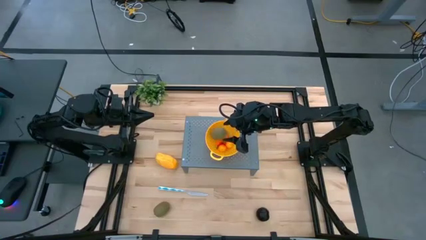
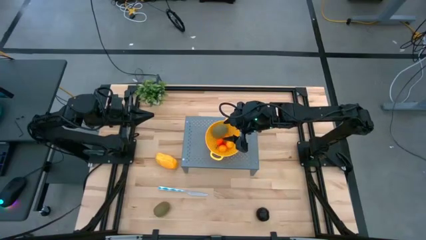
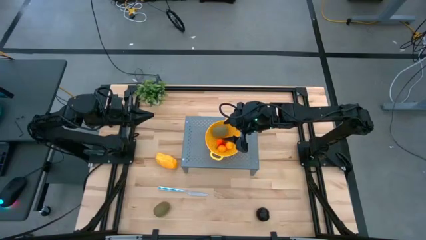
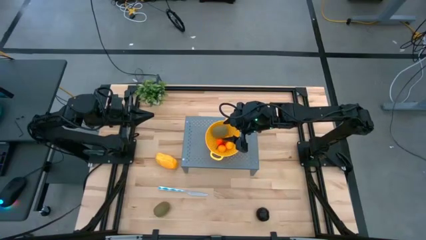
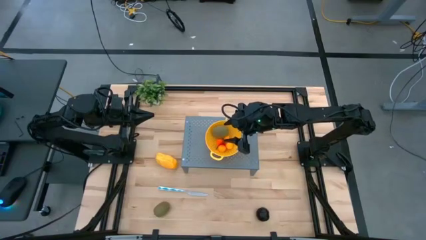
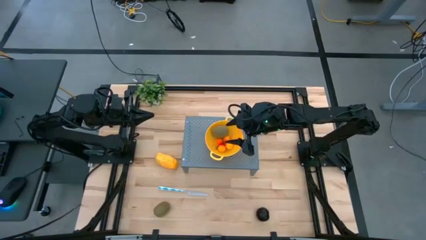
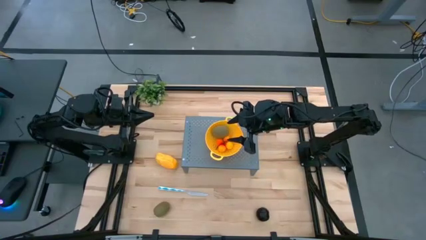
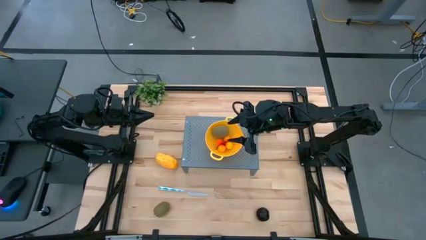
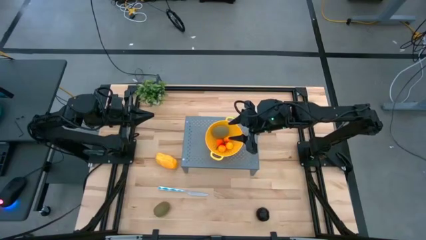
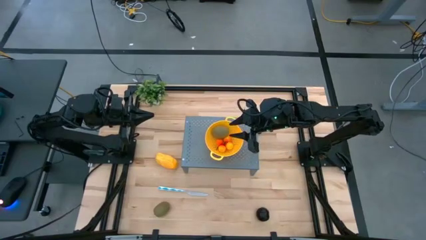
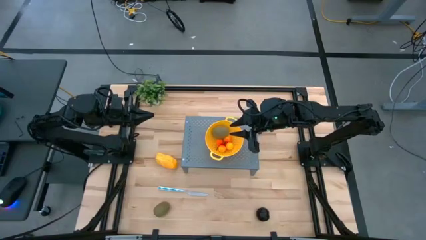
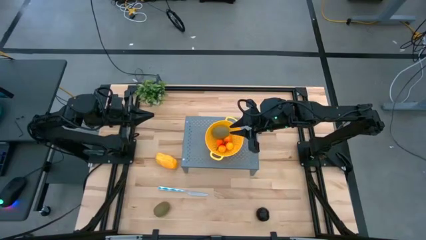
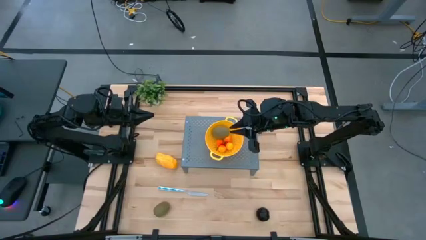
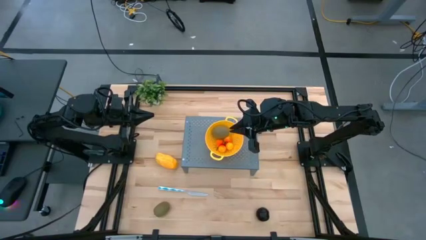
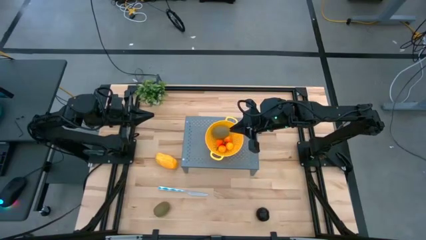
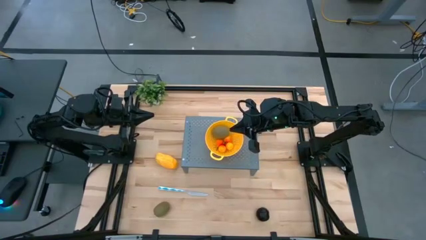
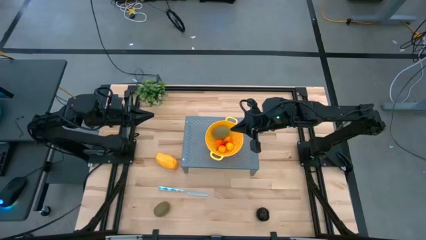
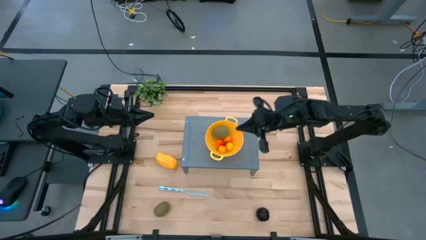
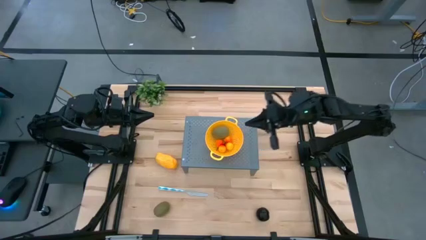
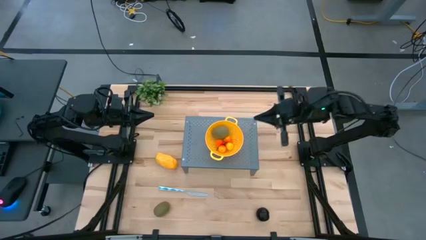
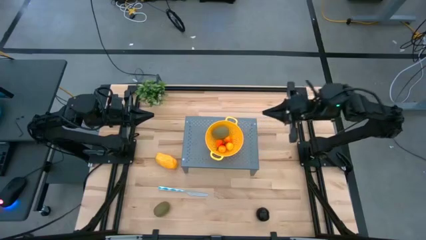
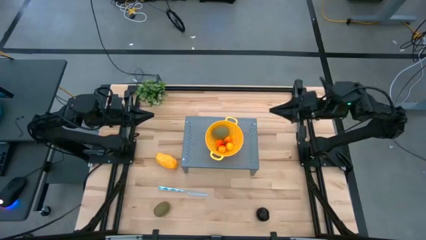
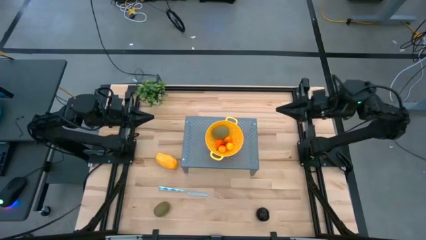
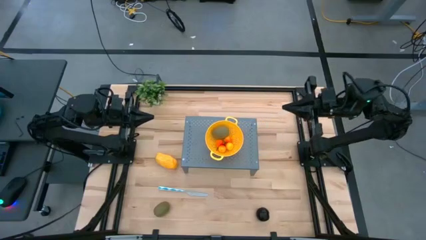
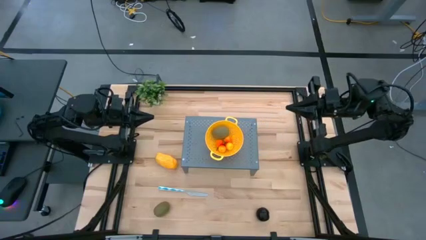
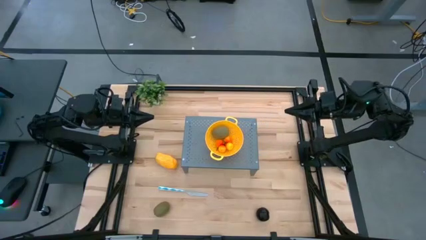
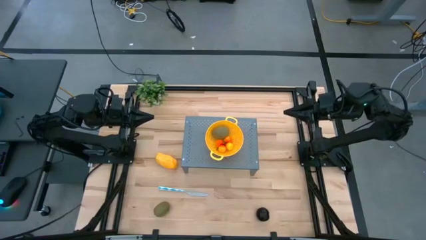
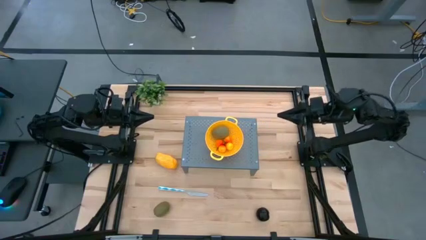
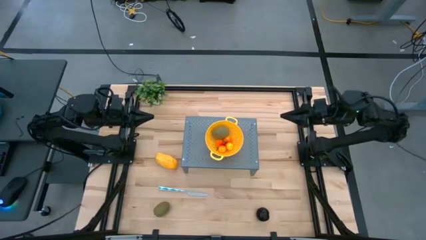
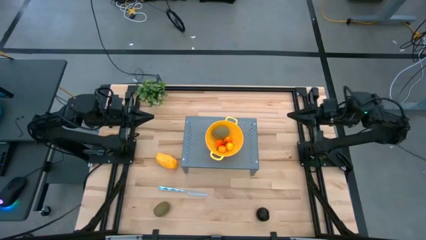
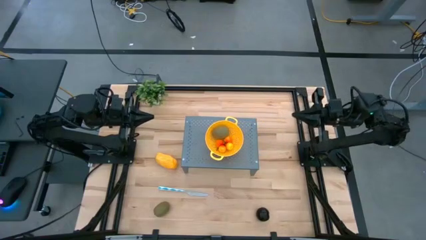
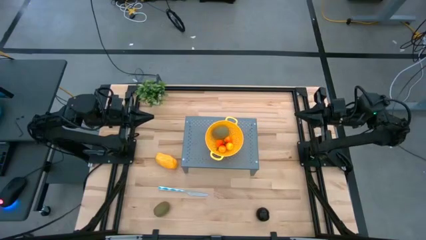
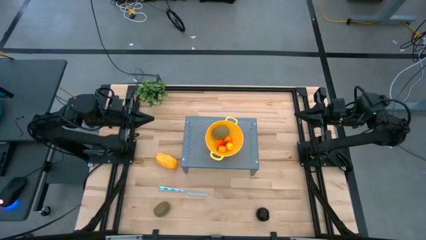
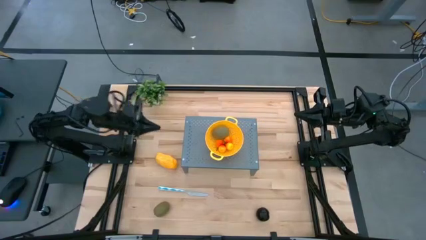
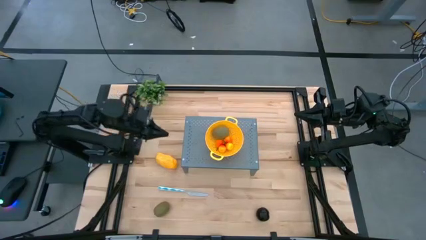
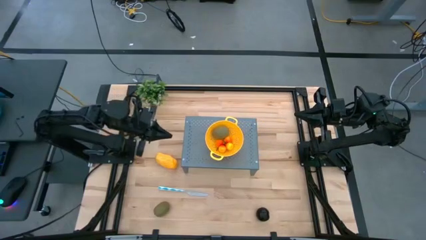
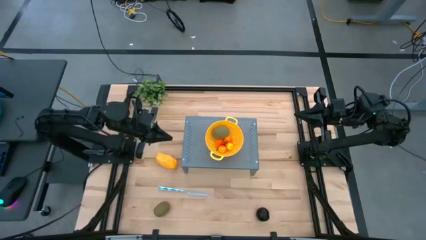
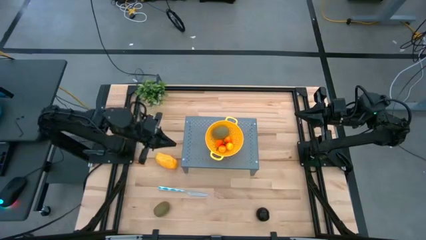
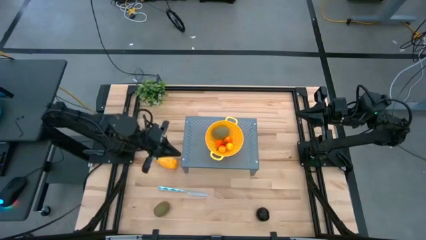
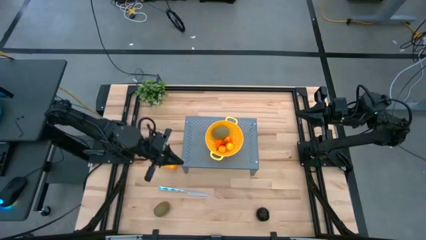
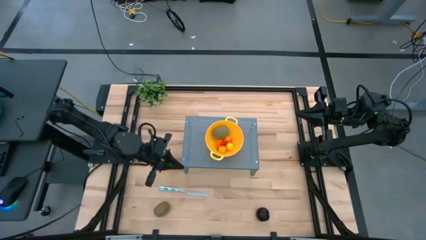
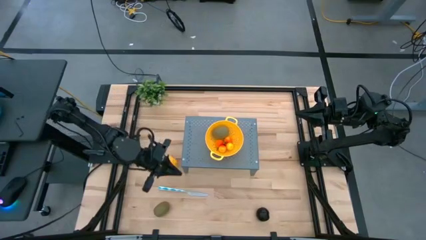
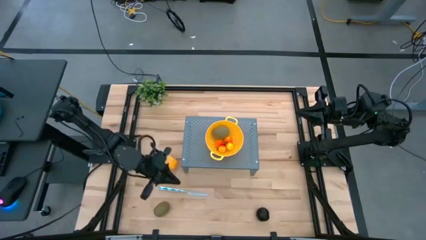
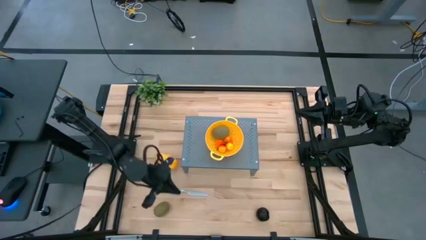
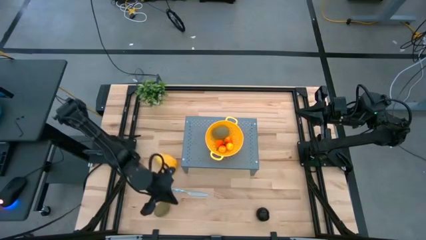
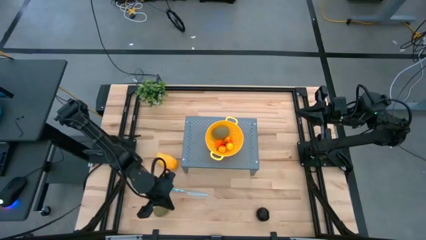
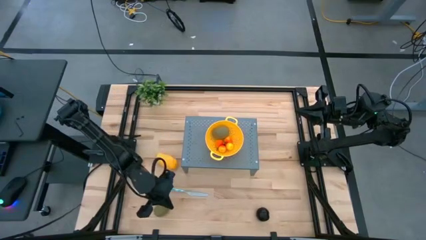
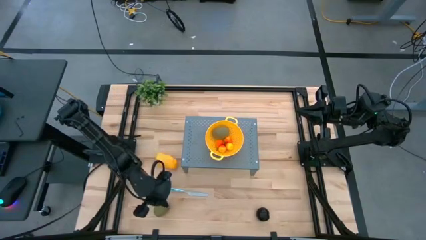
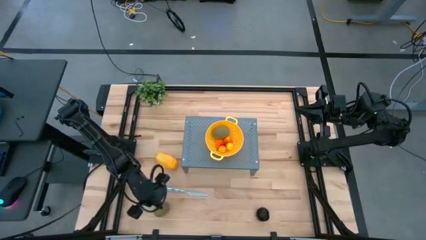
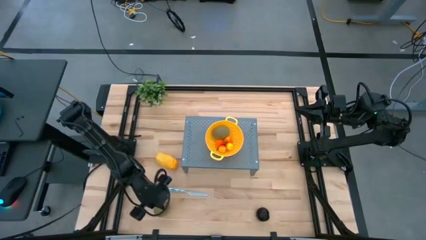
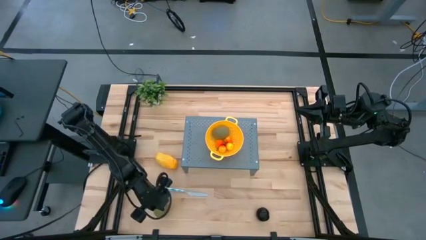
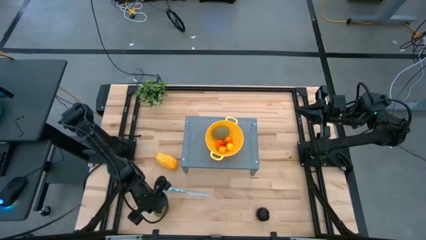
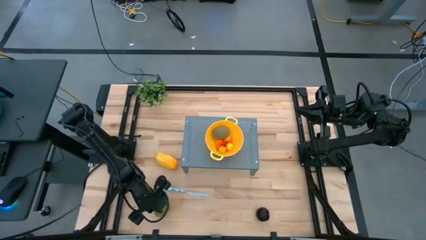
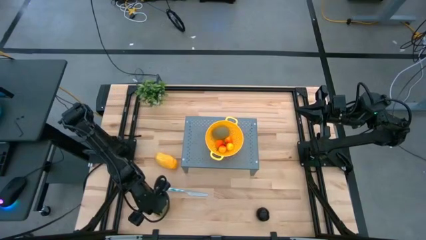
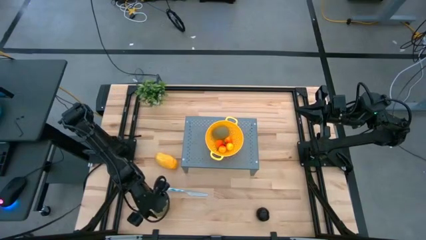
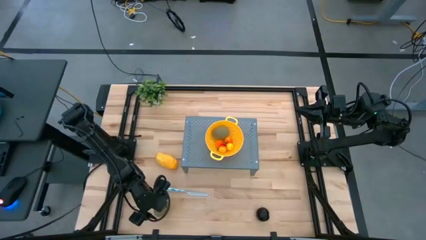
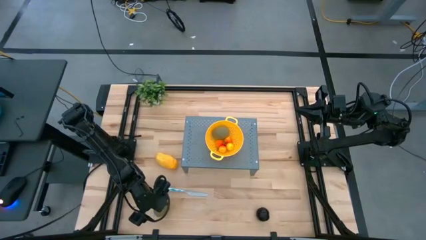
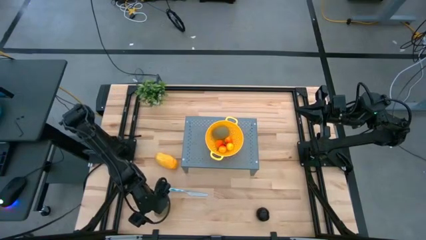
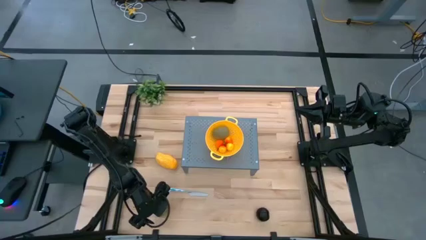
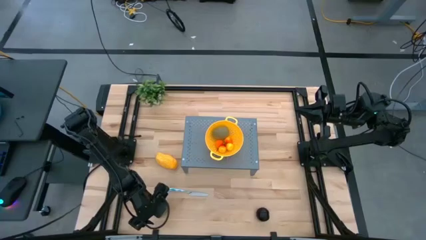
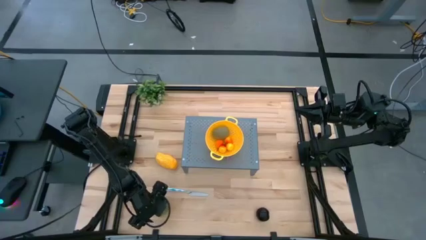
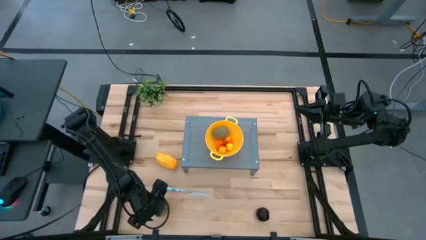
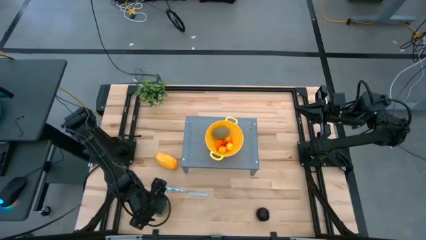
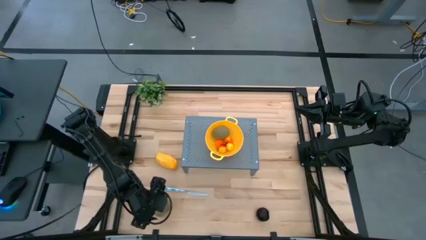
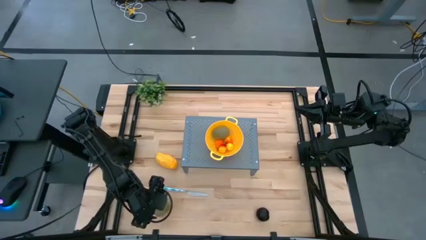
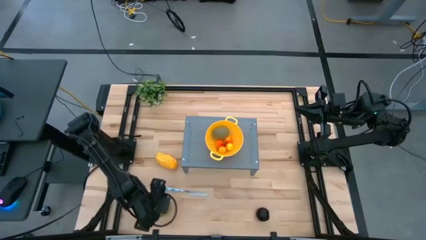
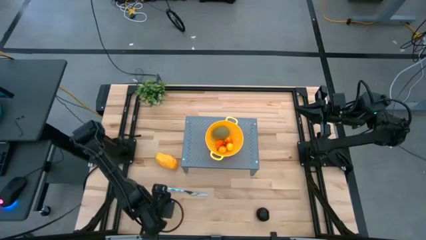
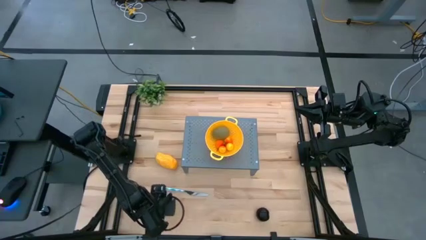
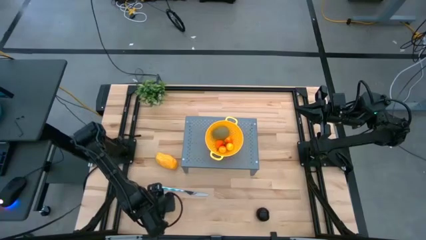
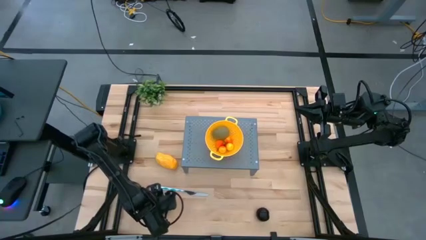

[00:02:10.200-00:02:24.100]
Task: Pick & Place Fruit
Put the kiwi into the strainer bowl on the shelf

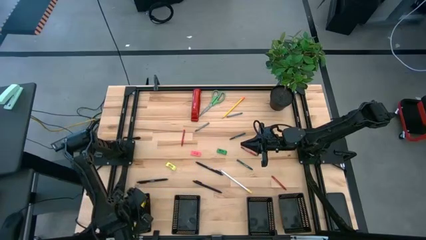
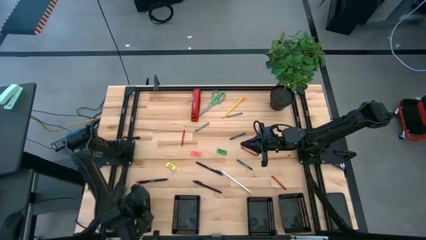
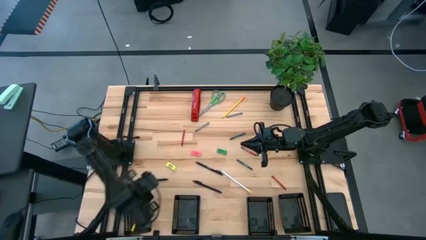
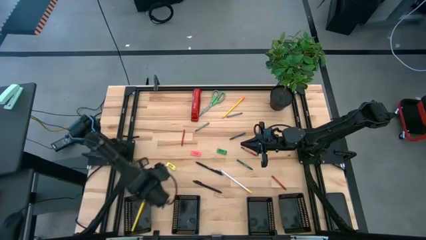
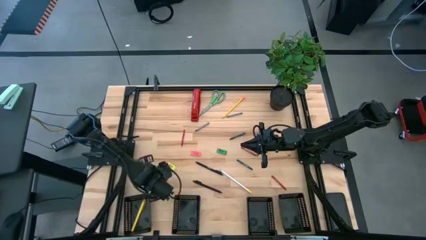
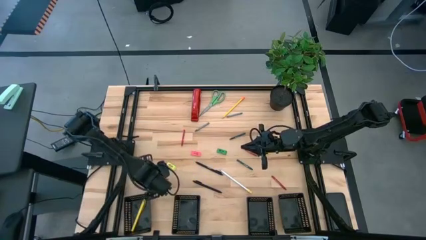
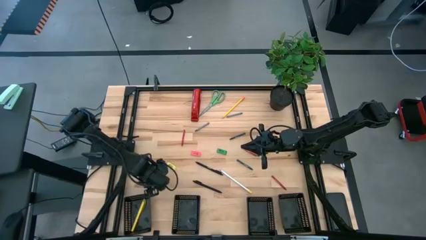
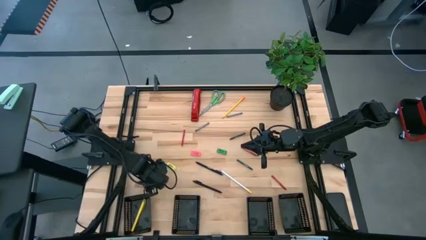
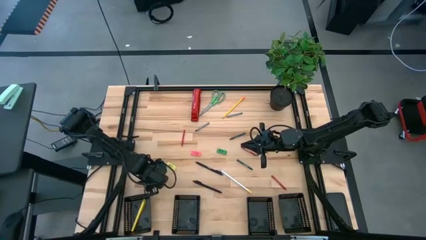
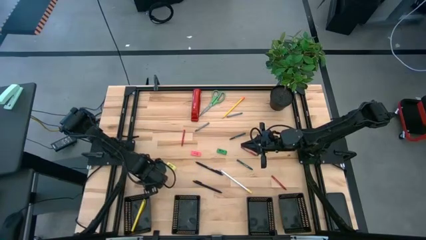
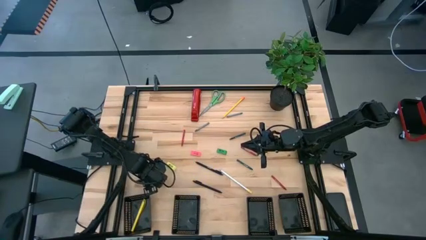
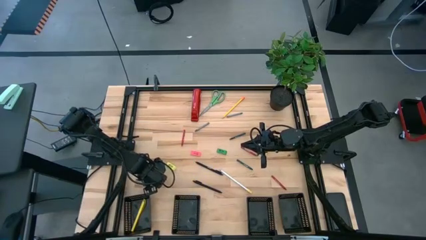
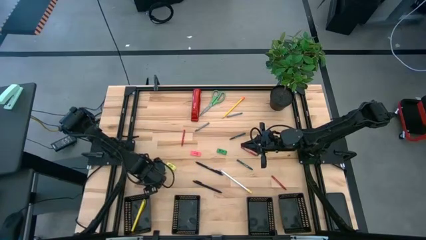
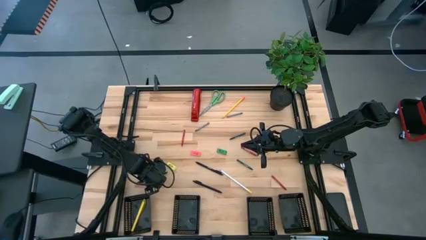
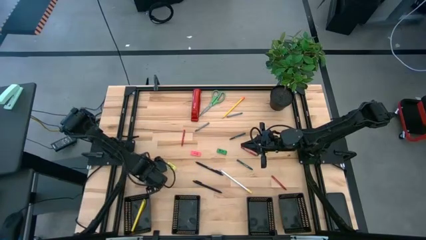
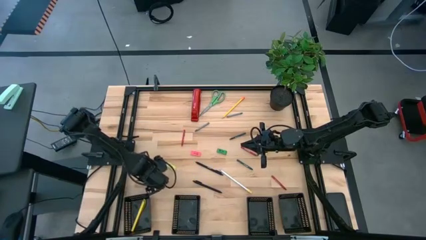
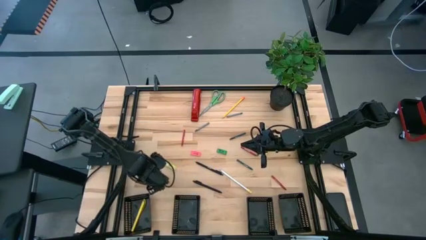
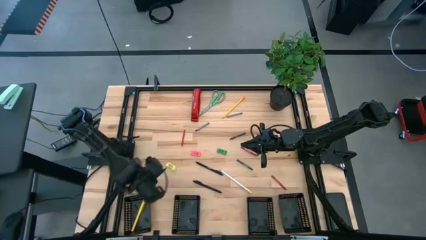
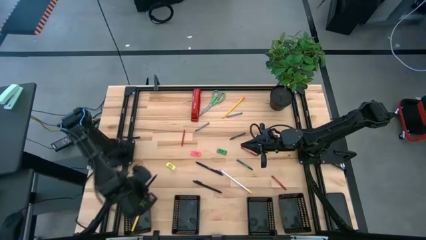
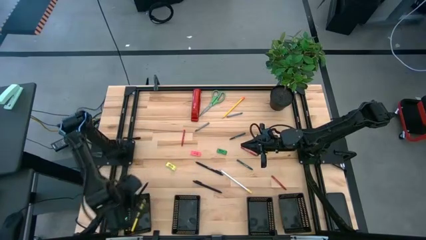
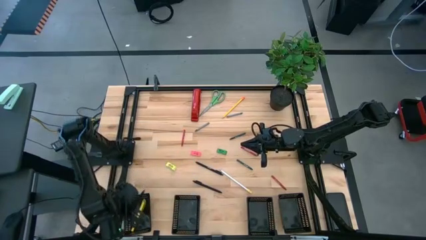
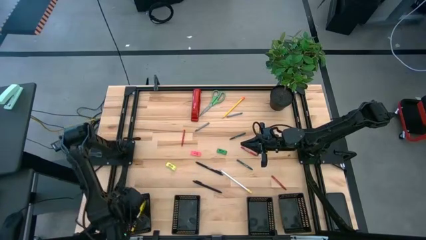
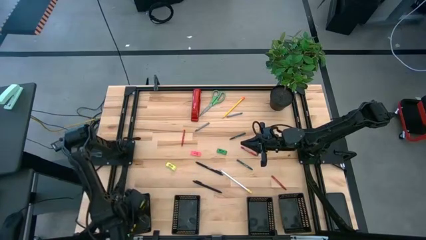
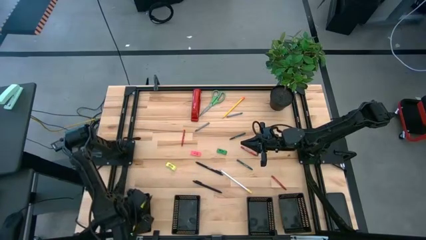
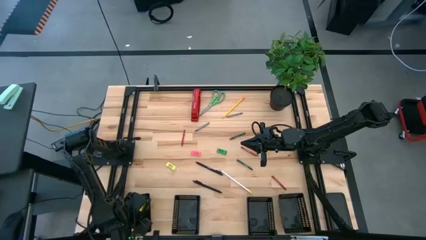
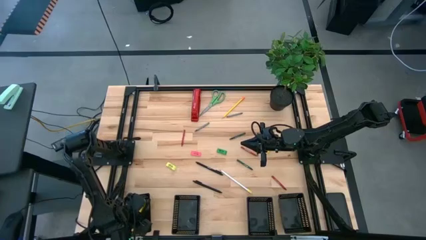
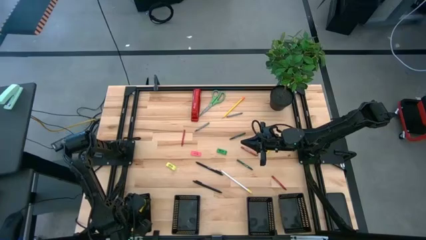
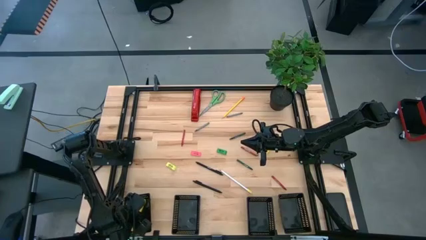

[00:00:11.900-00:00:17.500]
Task: Sort crayons/erasers/pens/pencils in bins
Put the bottom left black pen into the left black bin
